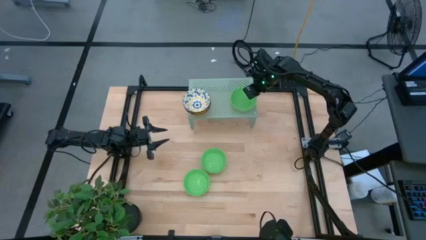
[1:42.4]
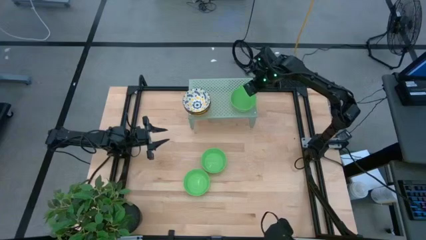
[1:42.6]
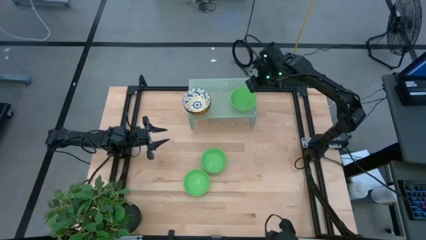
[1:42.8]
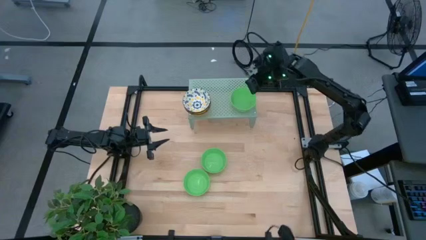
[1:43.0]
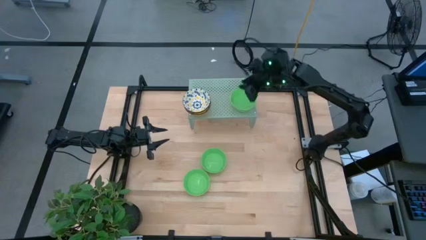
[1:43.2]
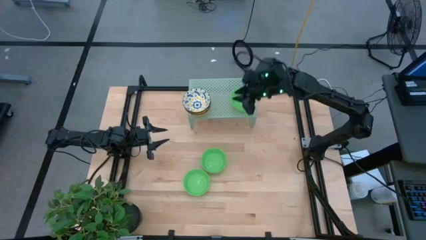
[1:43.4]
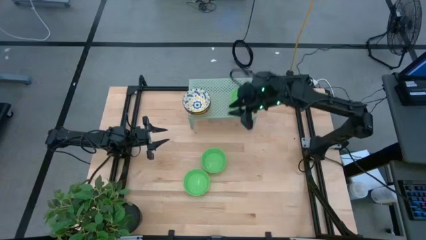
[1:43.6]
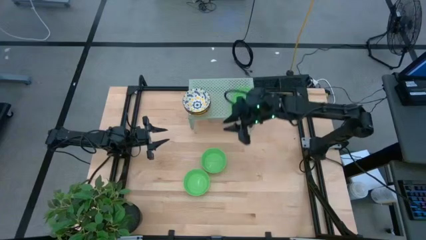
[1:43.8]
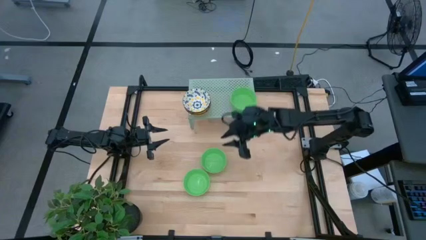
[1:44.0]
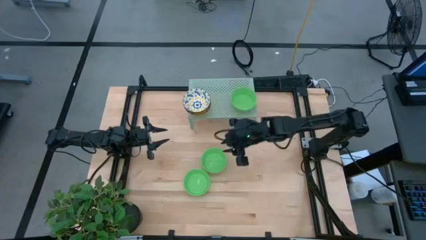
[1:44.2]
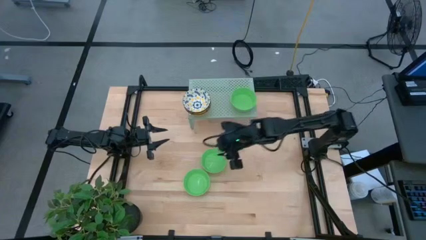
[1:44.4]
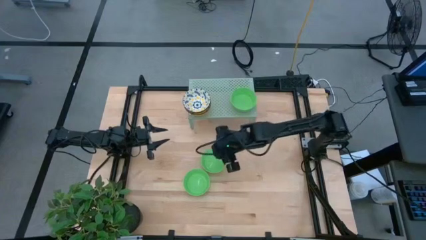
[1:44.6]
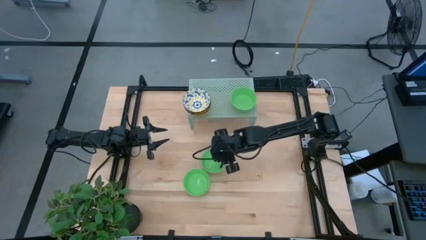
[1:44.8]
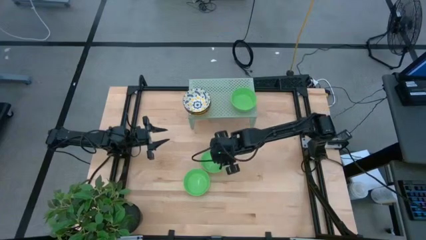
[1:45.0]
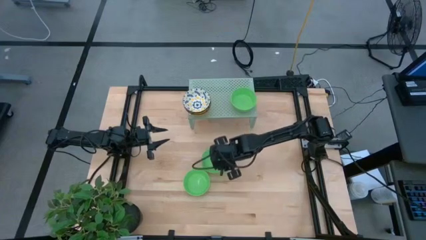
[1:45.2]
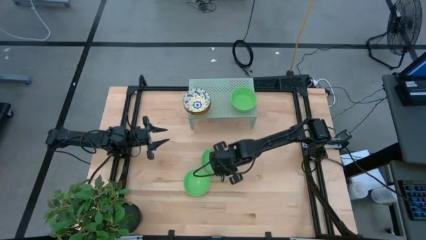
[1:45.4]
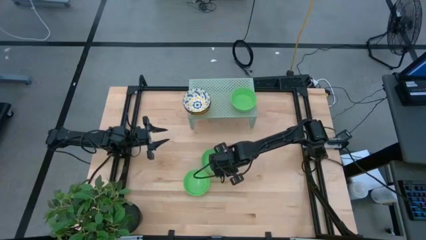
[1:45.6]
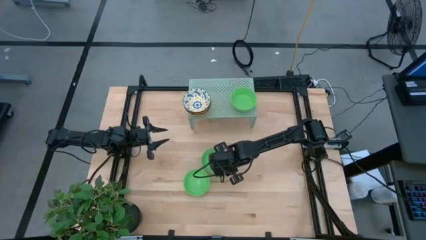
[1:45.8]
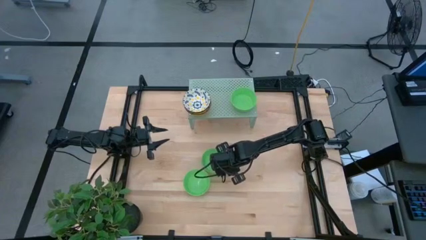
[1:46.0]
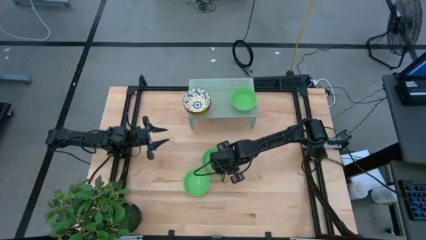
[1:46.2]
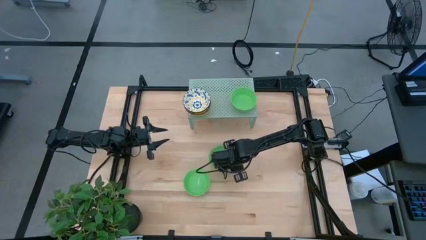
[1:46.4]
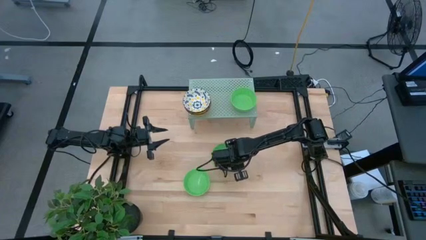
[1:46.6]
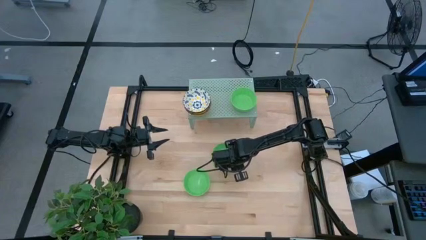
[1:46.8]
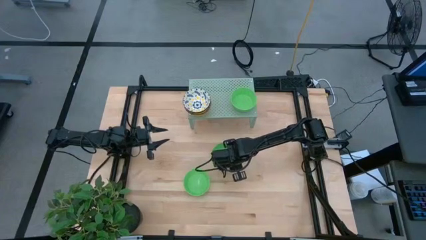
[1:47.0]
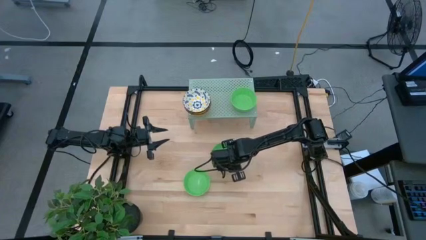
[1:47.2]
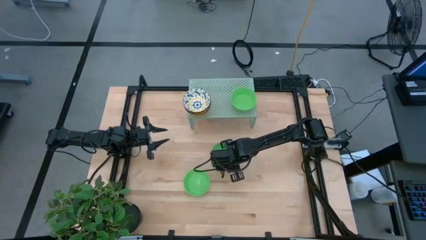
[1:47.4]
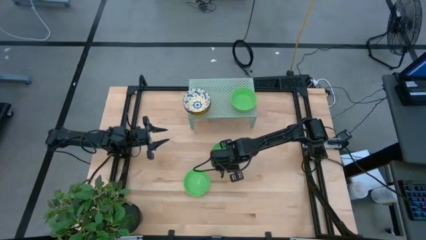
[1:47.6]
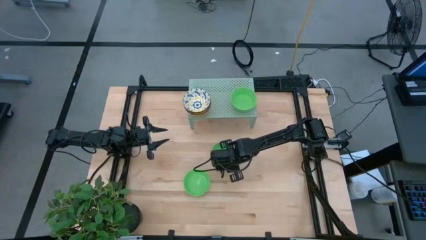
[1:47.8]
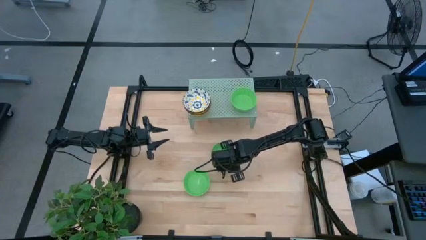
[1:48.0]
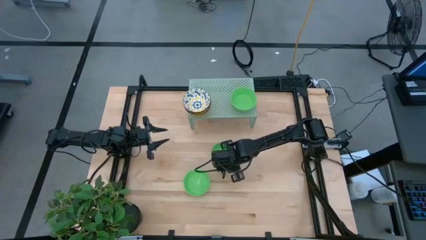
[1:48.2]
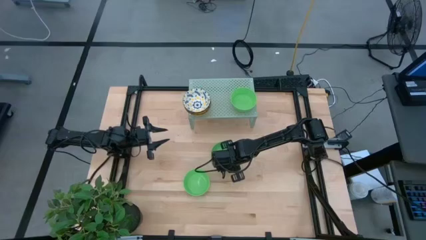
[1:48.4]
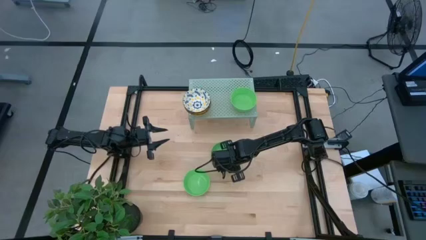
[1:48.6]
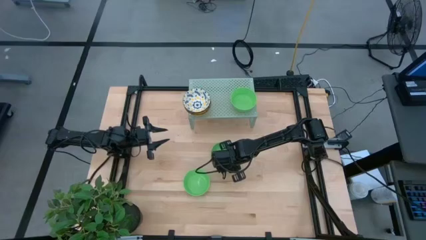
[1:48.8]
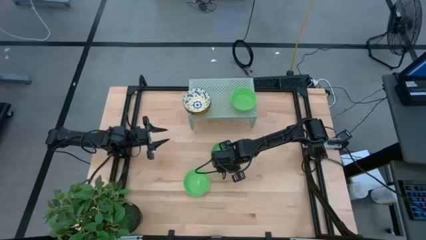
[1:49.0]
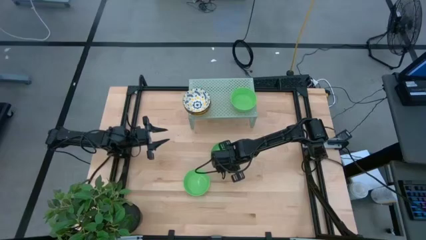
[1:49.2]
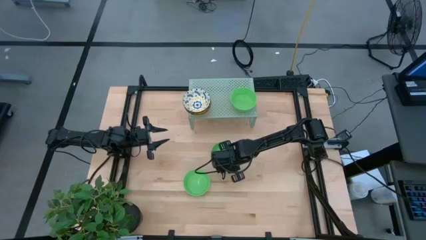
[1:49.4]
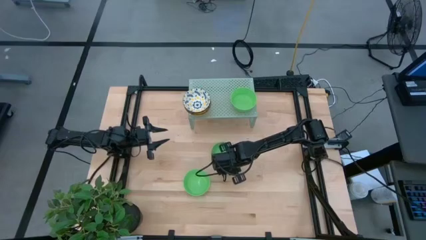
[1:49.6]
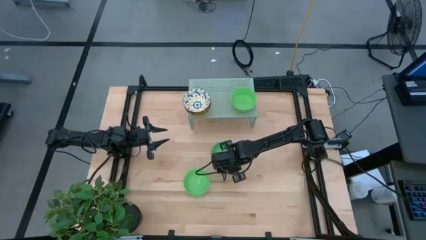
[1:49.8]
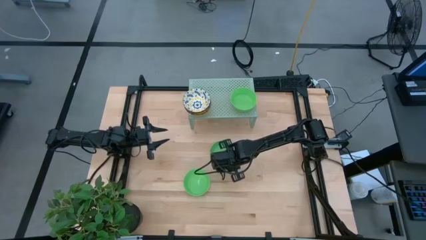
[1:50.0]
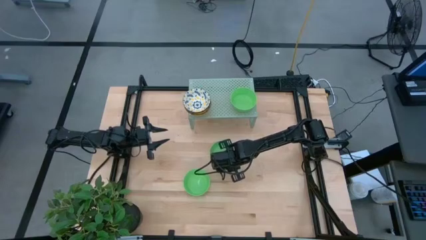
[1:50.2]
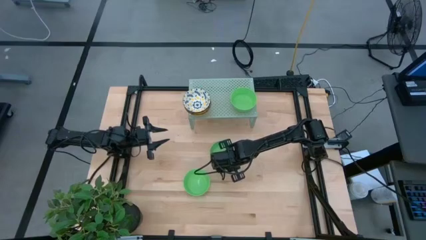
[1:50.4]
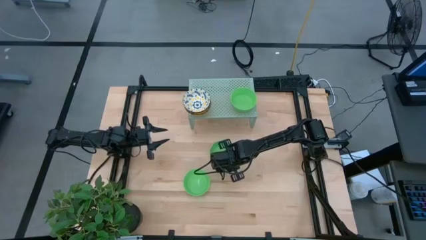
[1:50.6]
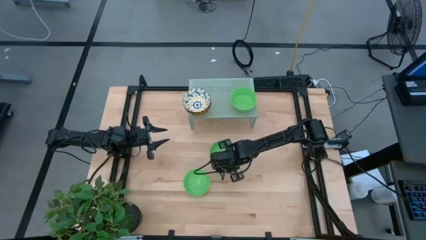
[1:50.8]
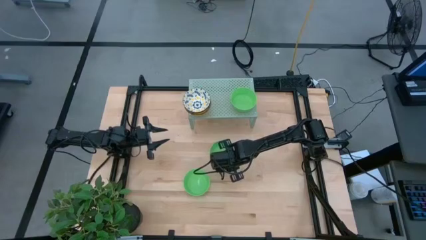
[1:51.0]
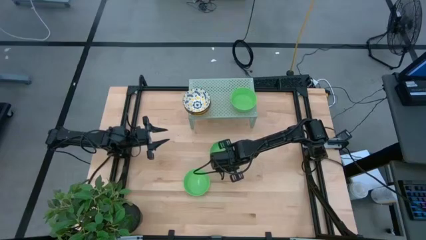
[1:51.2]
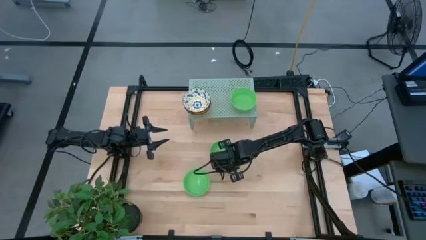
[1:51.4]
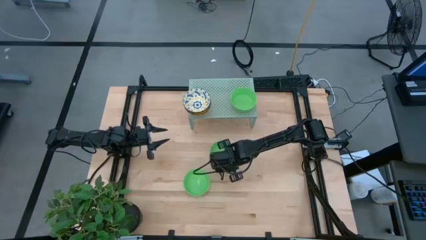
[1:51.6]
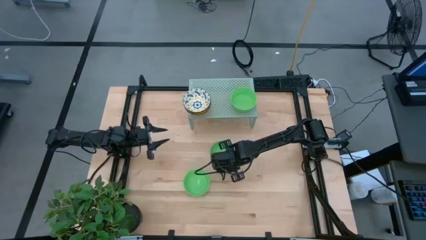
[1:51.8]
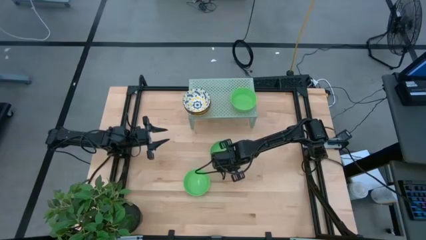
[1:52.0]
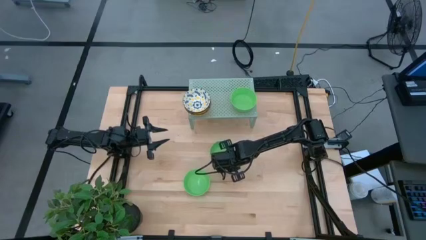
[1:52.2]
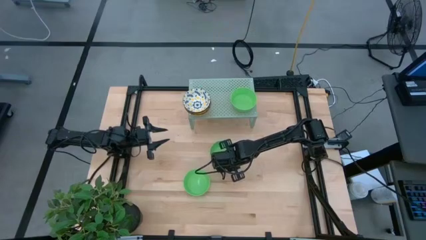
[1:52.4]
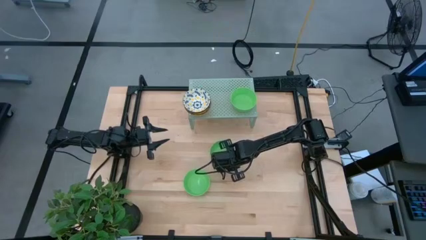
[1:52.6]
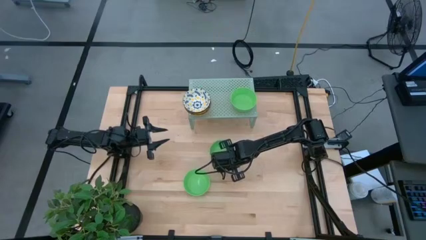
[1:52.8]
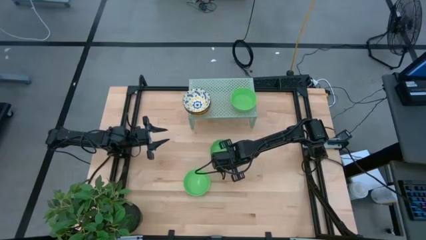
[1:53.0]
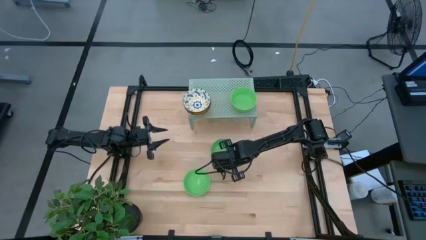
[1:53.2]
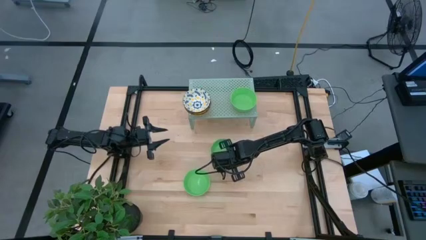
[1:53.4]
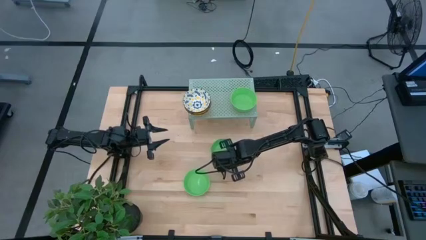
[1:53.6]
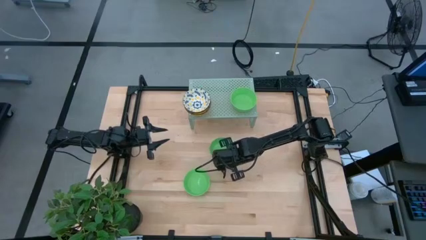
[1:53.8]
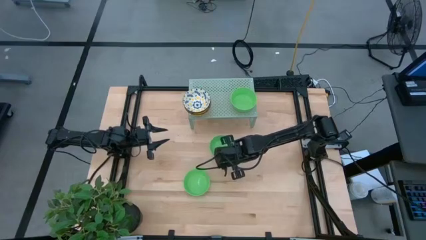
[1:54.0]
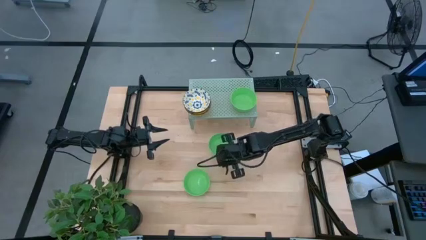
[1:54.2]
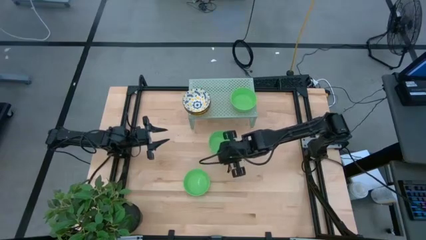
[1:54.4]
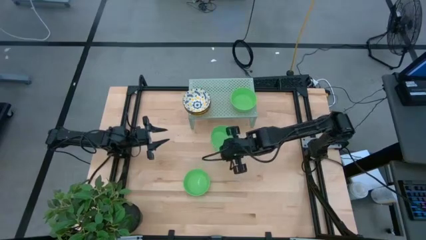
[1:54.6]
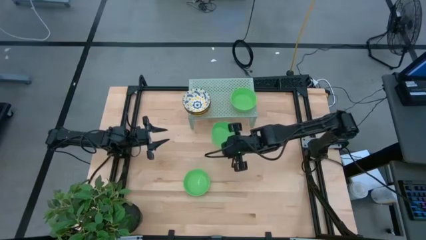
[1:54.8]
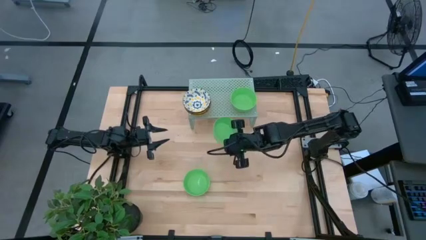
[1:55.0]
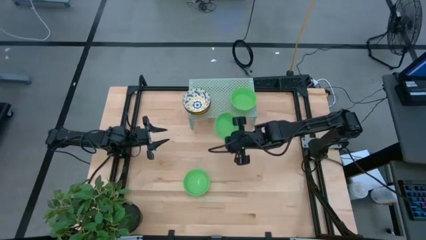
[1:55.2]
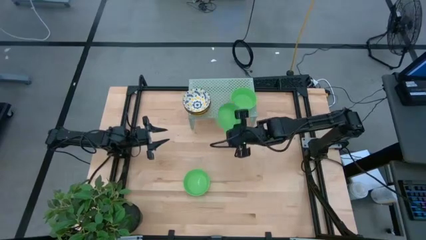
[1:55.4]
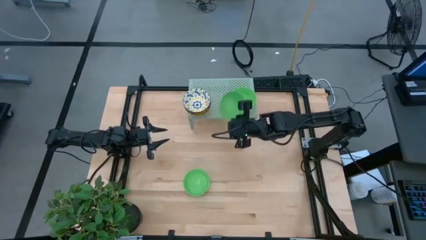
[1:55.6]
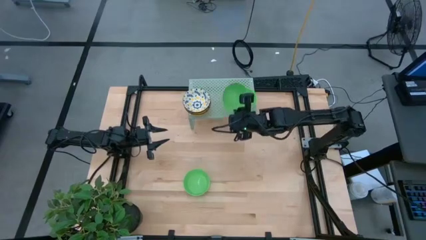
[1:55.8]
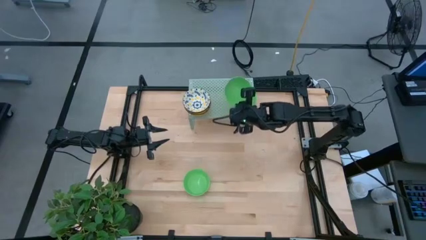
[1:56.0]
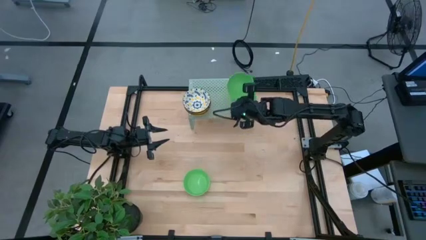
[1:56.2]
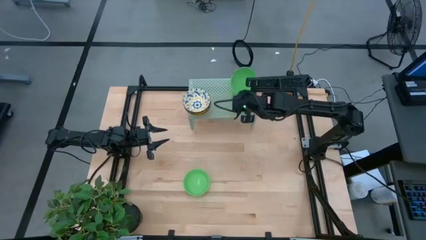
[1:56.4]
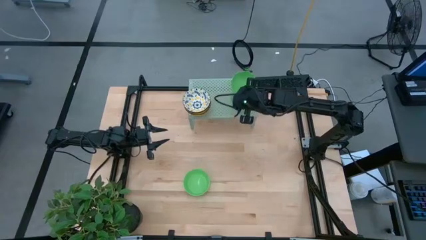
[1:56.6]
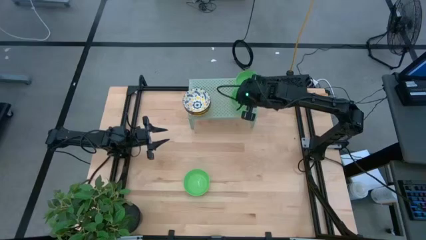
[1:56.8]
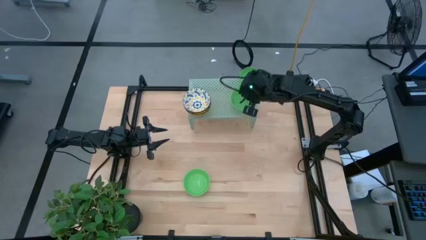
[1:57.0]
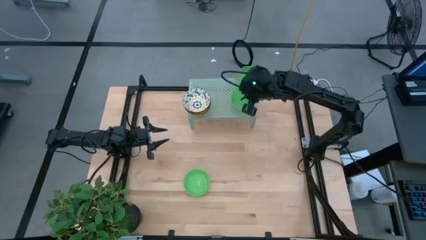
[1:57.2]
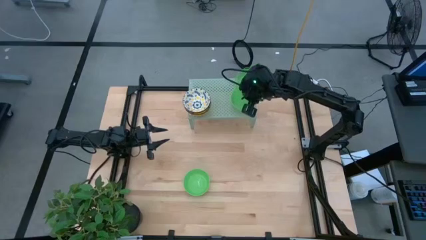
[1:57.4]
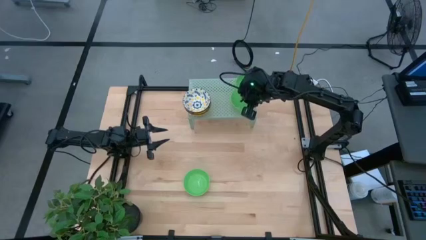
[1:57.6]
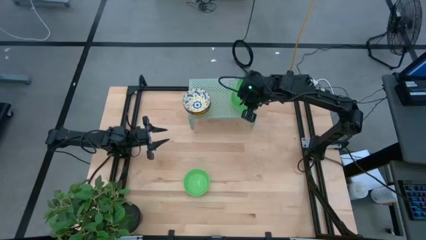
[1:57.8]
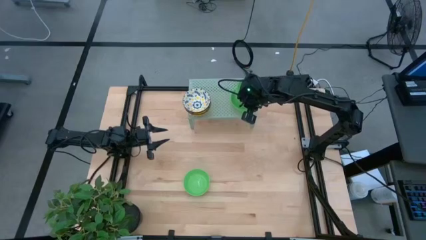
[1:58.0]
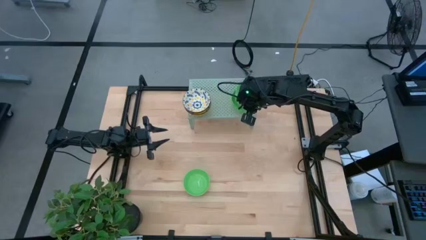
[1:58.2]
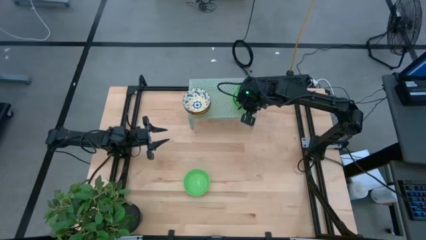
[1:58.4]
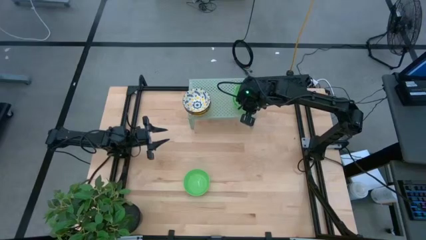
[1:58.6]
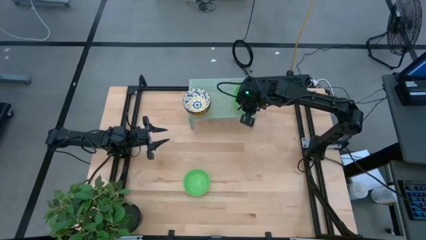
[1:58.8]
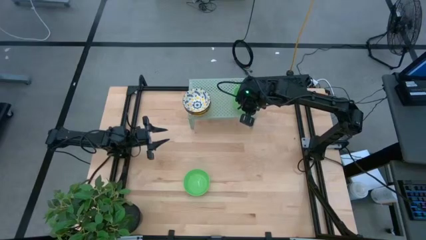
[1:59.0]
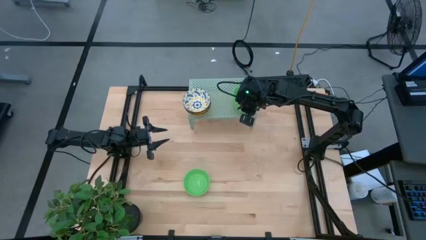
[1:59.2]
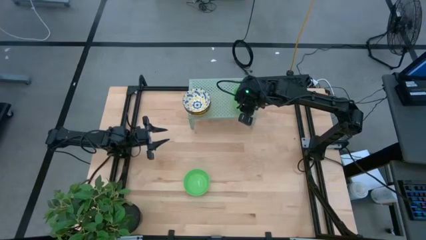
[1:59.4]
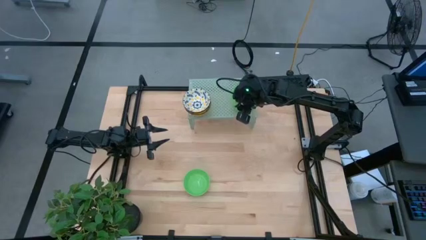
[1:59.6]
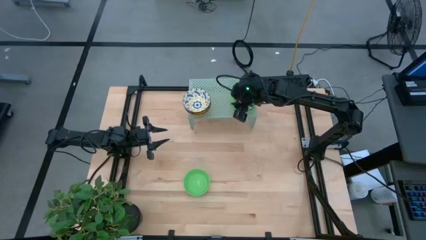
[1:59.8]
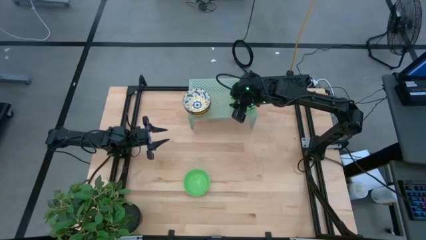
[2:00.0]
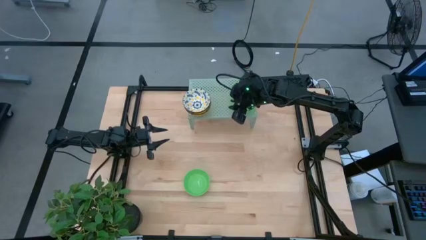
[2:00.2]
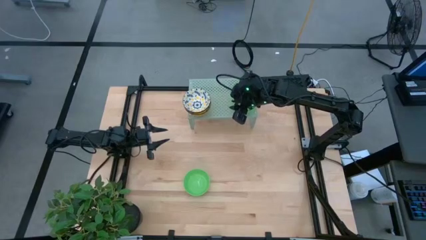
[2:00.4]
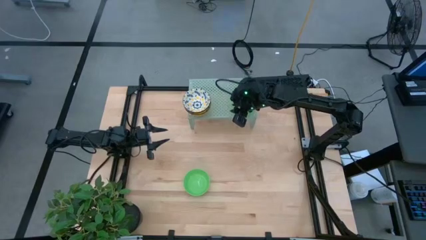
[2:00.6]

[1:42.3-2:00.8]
Task: Pick & Place Mini bowls
Stack the top green bowl on top of the green bowl on the shelf
